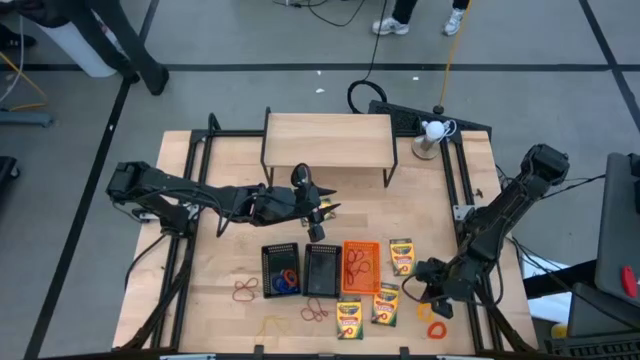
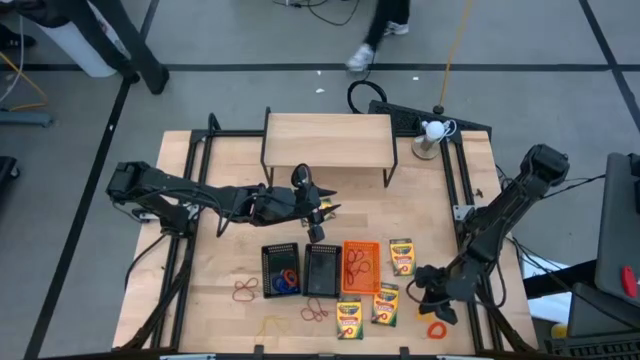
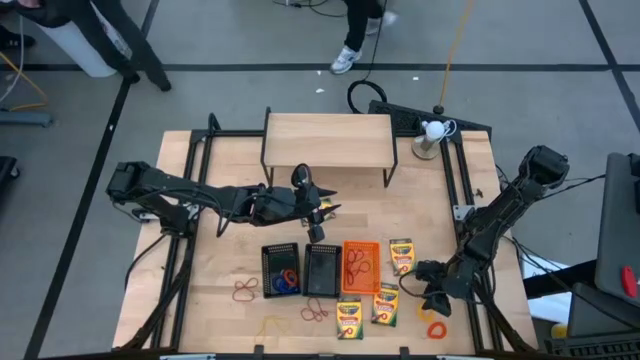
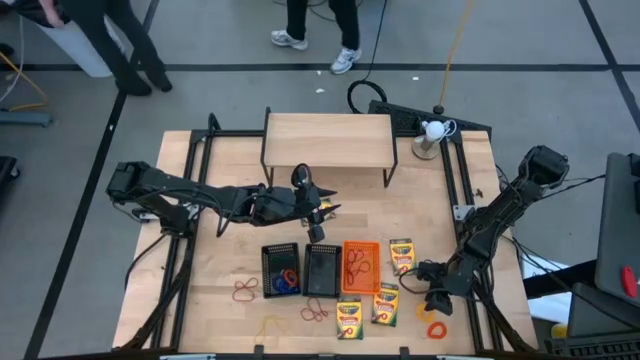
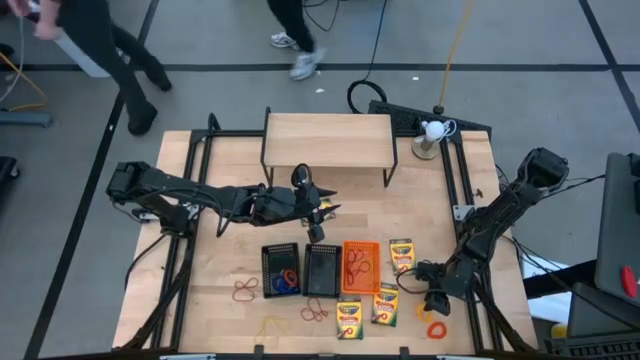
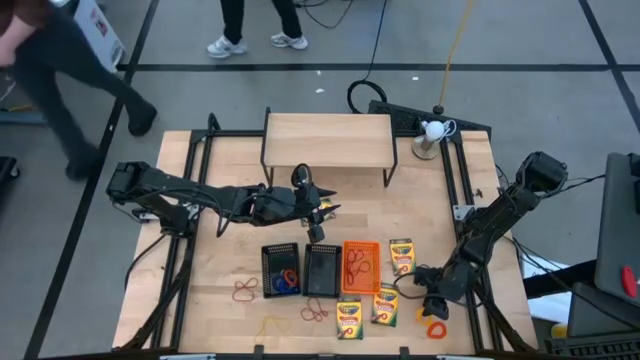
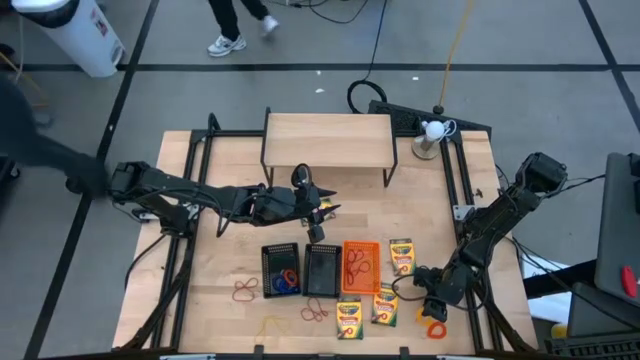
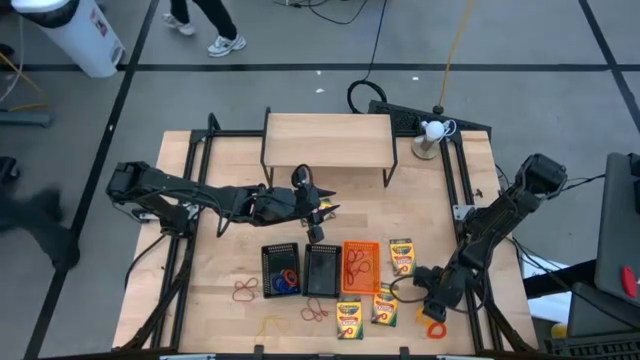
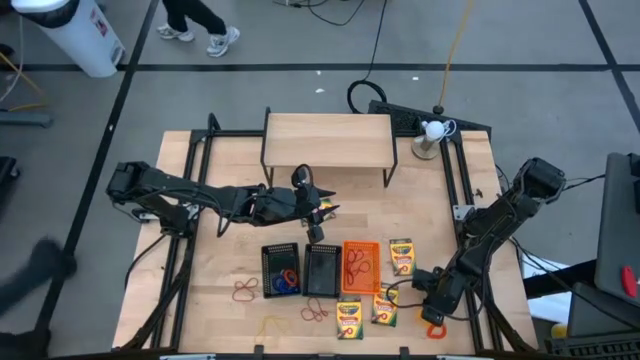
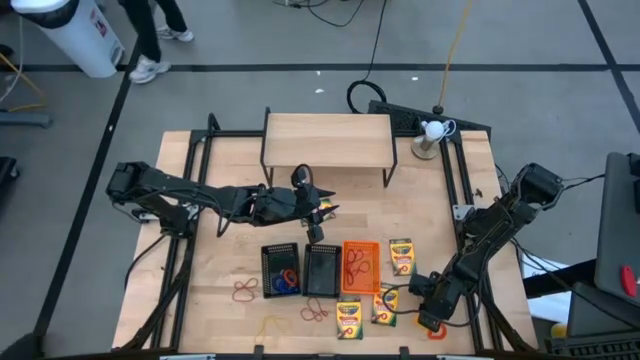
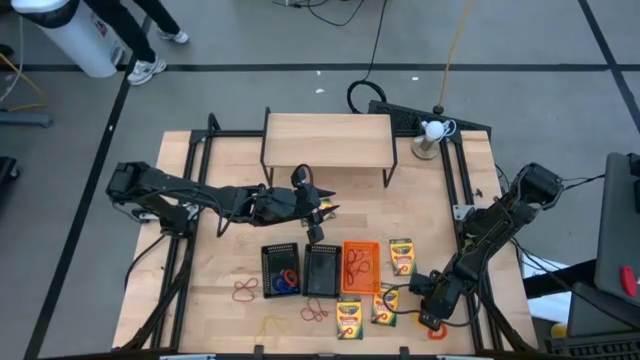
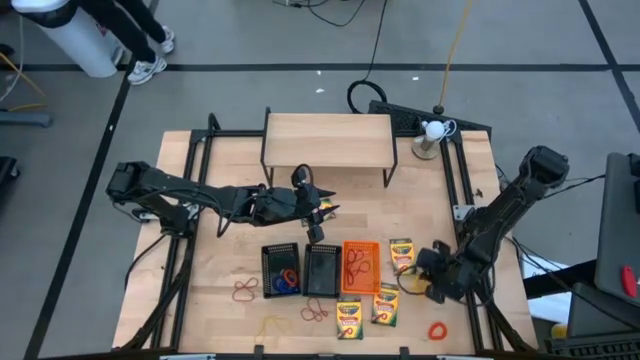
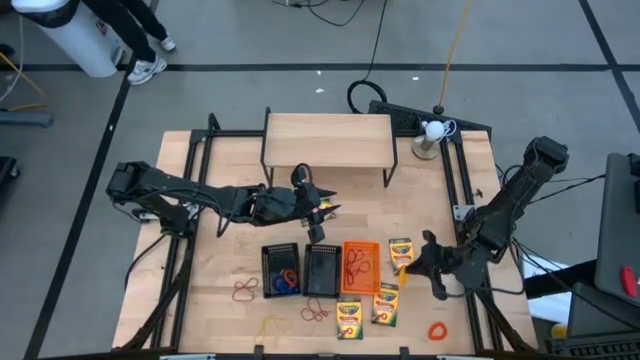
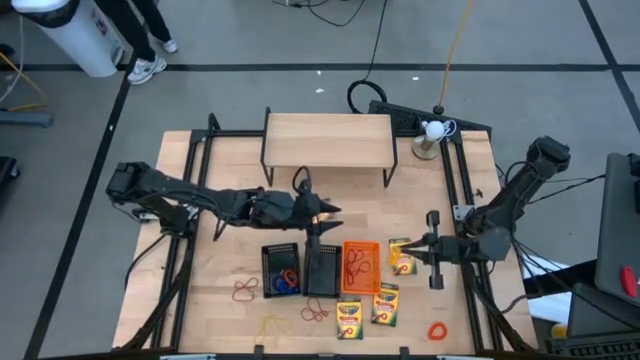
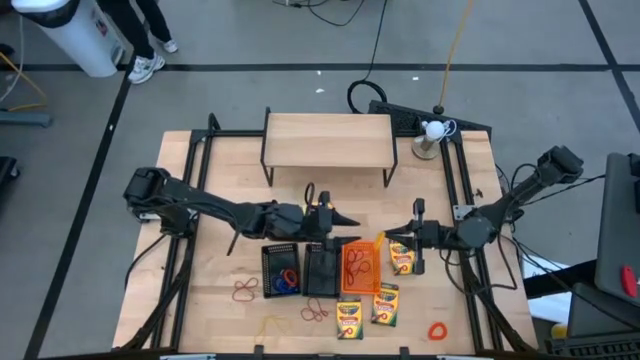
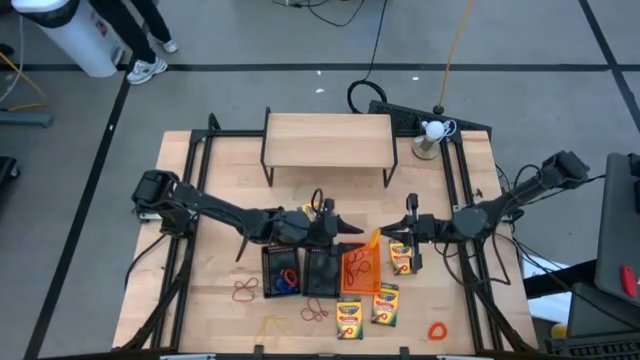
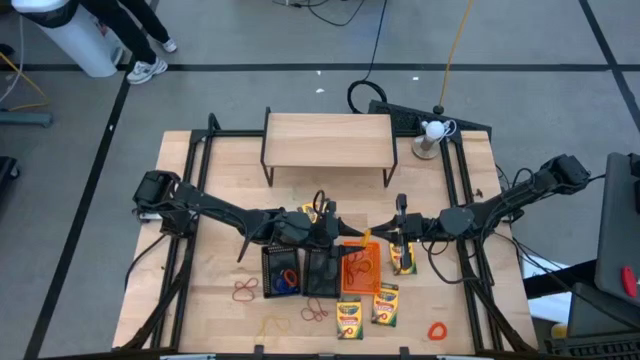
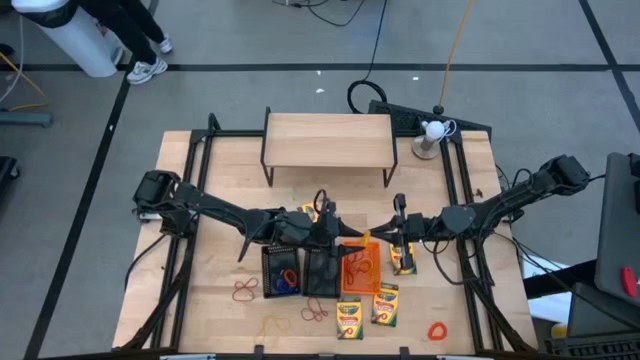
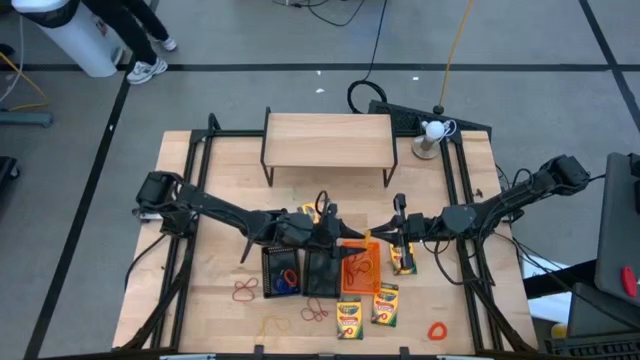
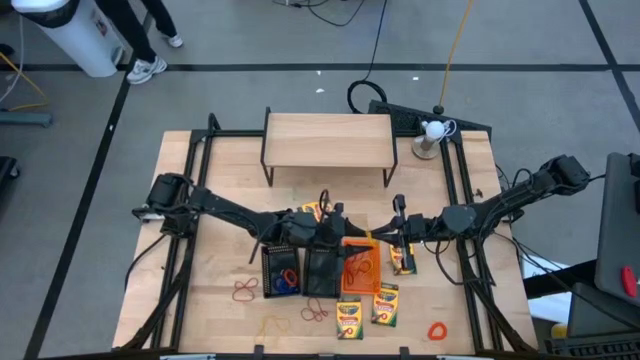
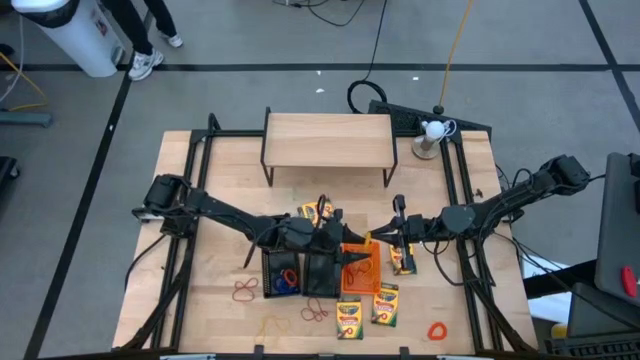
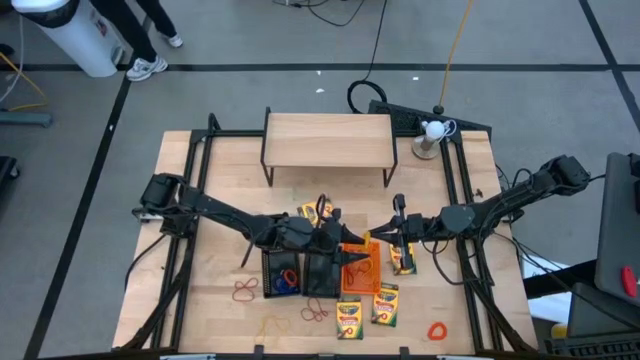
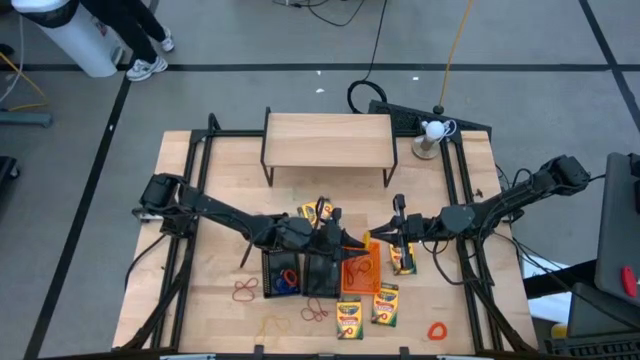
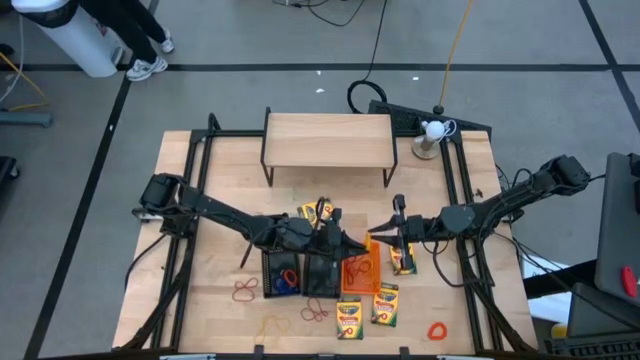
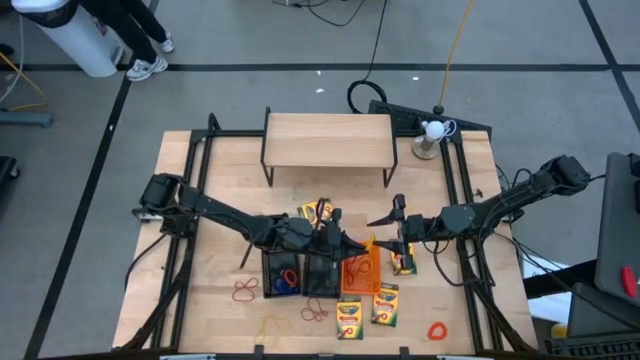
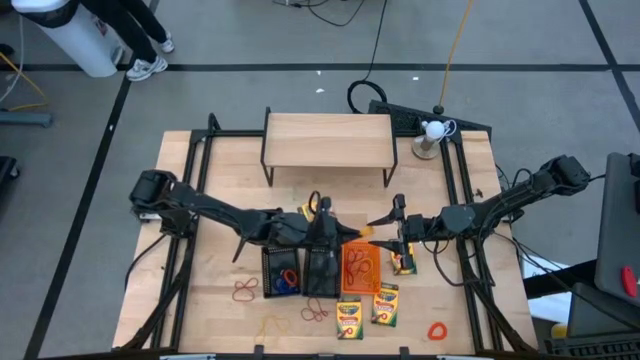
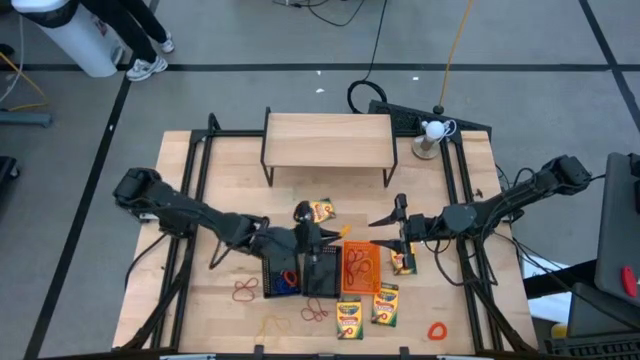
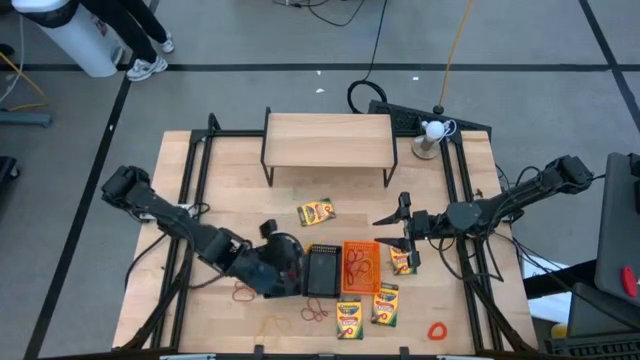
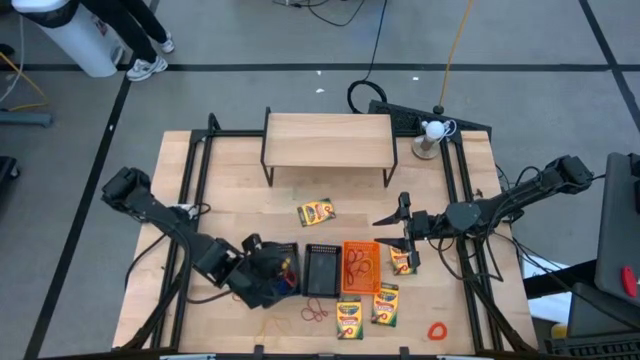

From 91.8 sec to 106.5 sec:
Task: Pick & Place Office Desk Supplies
Put the yellow spring keychain into the left black bin

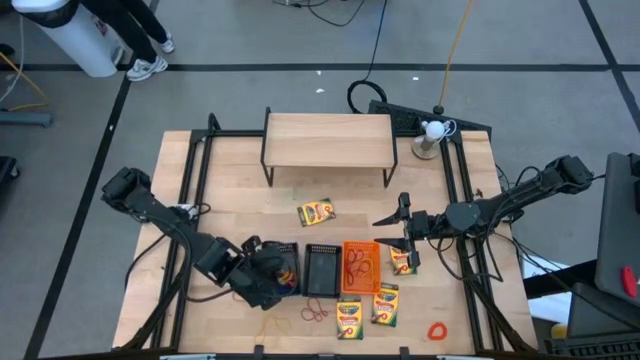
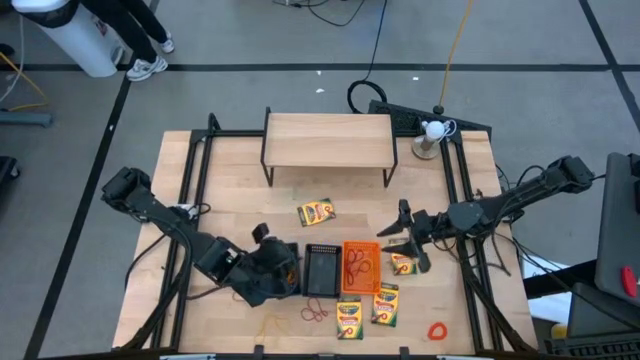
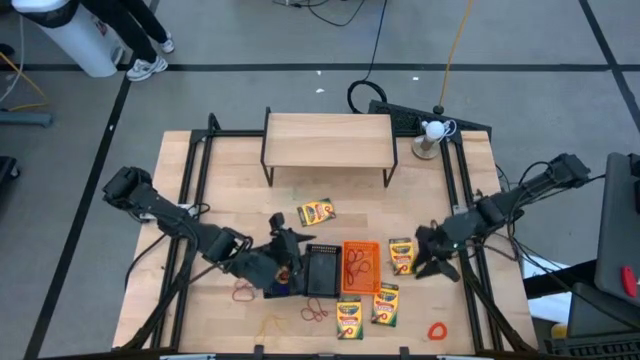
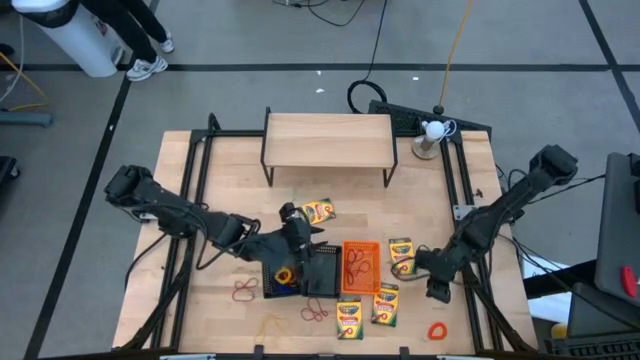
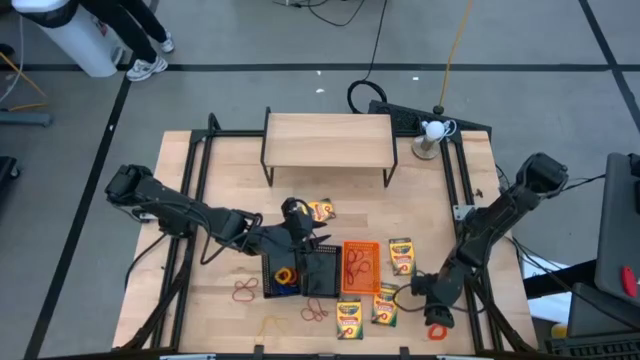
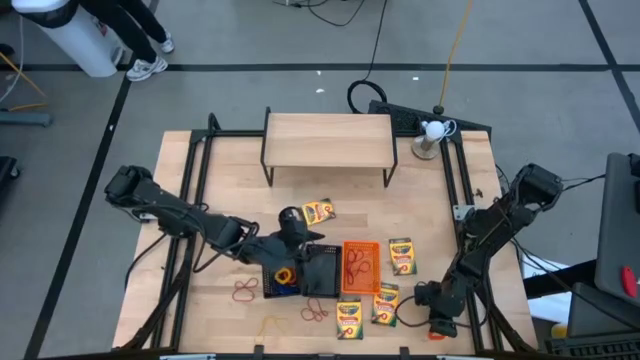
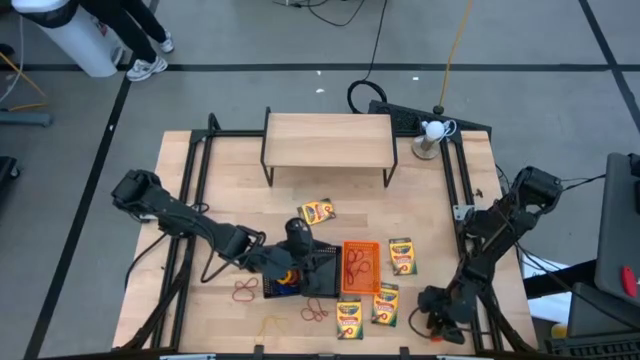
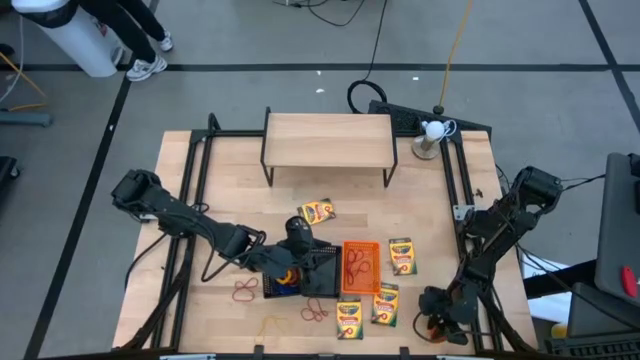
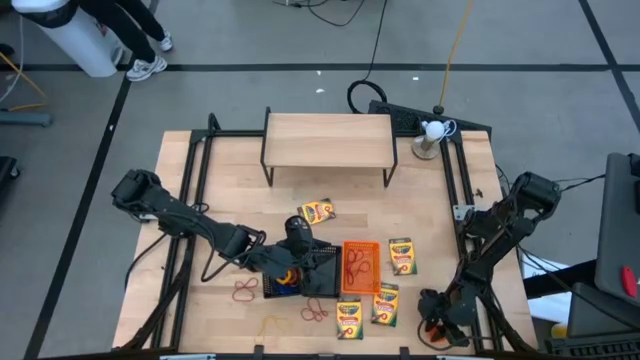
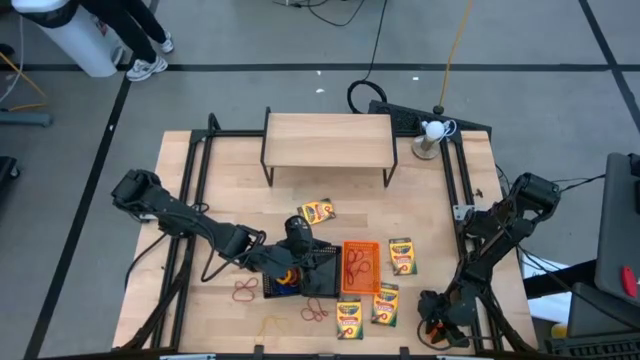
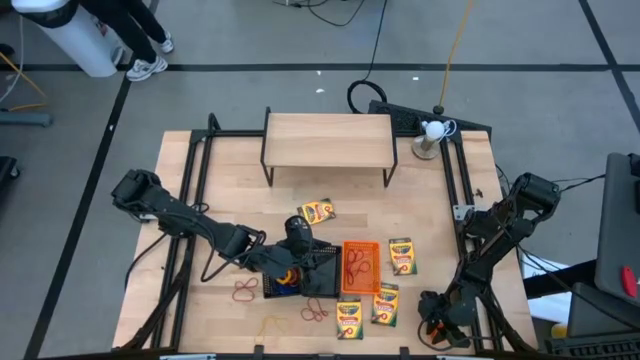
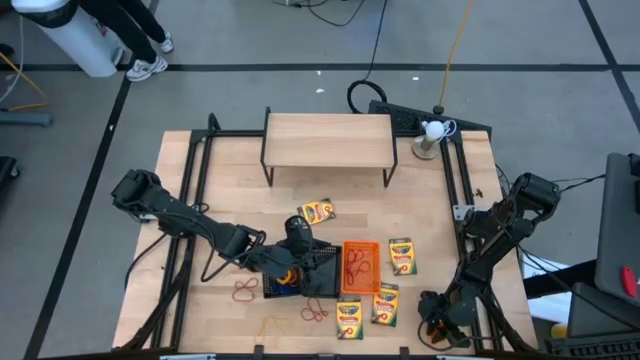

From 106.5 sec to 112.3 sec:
Put the orange spring keychain into the left black bin

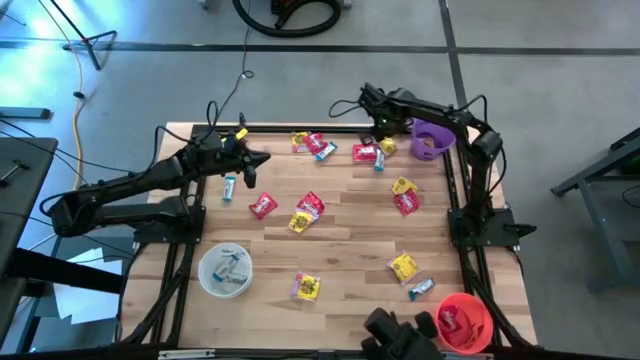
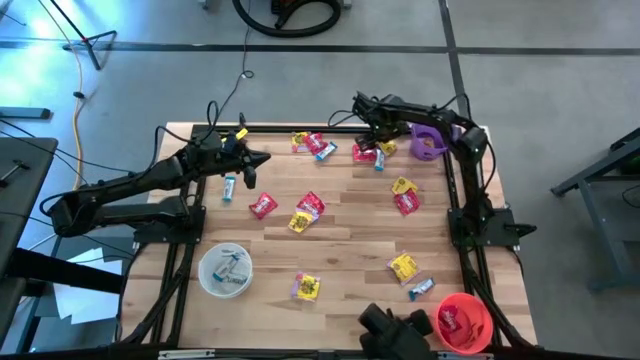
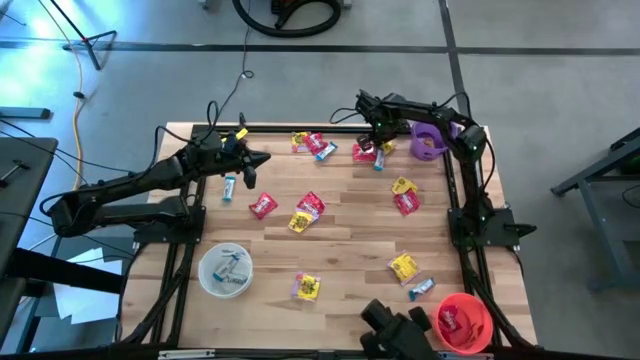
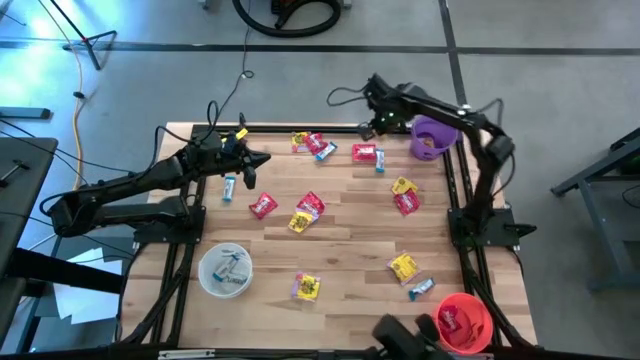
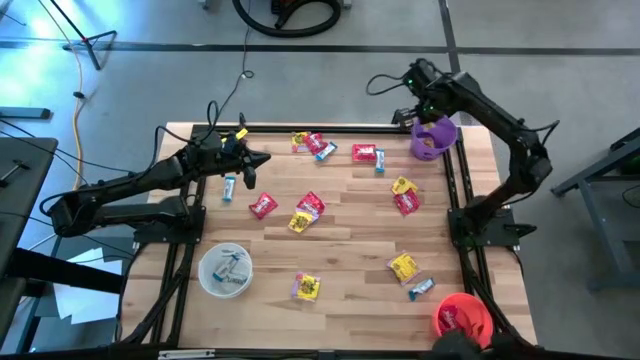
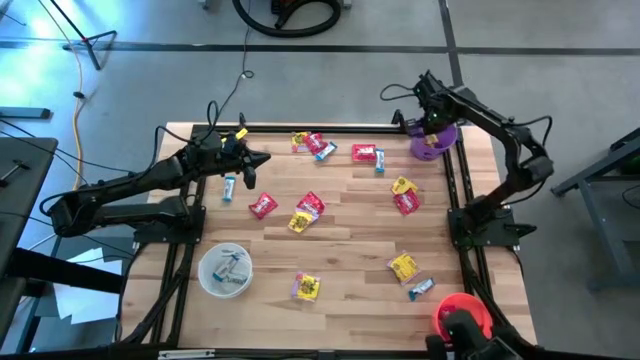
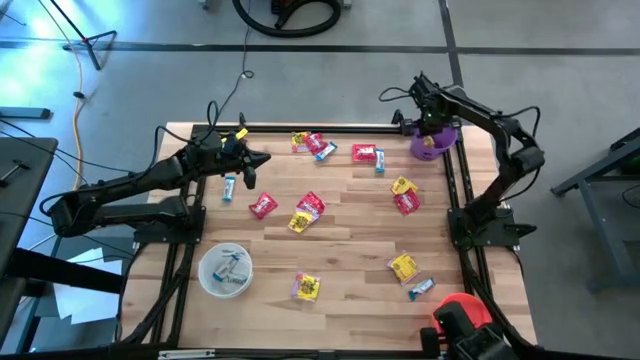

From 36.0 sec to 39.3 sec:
Task: Sort candy
Put the yellow candy into the purple bin
